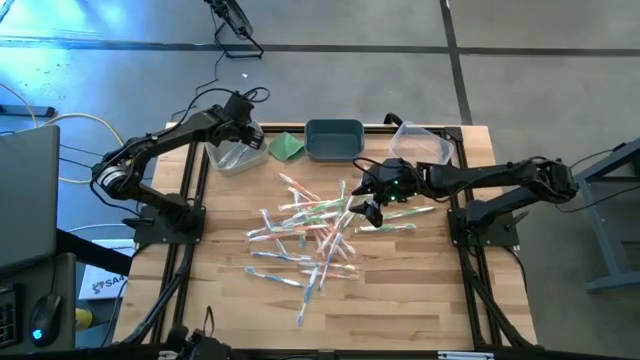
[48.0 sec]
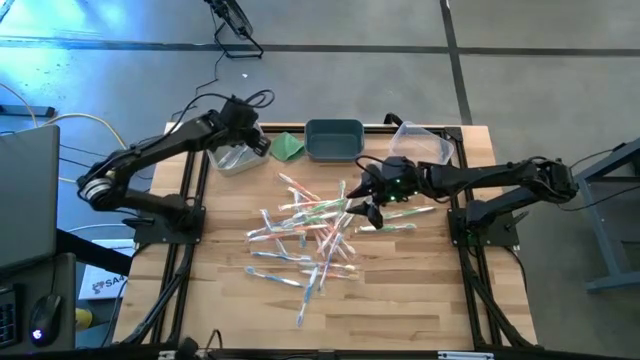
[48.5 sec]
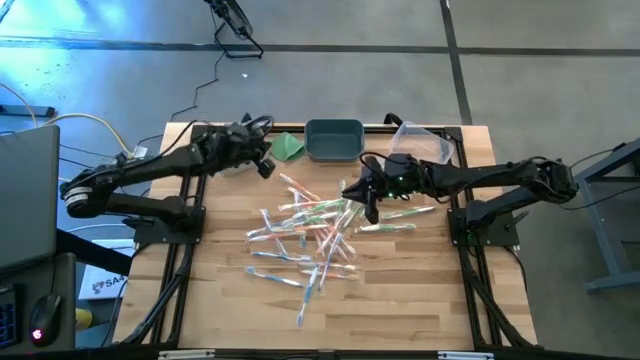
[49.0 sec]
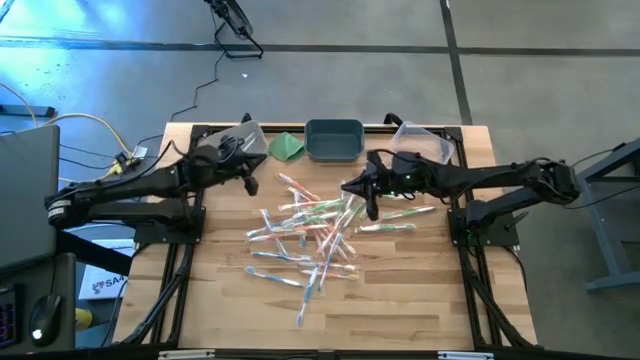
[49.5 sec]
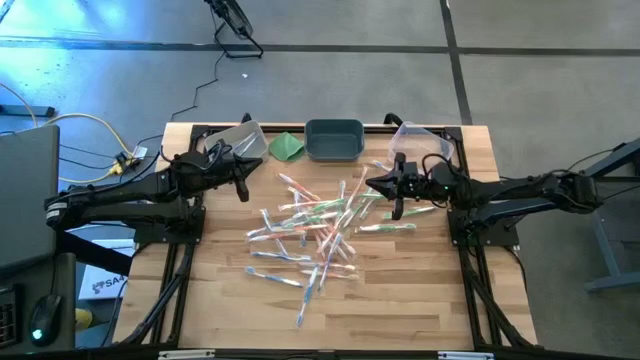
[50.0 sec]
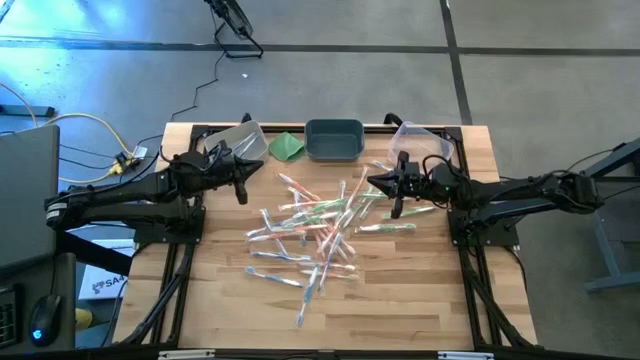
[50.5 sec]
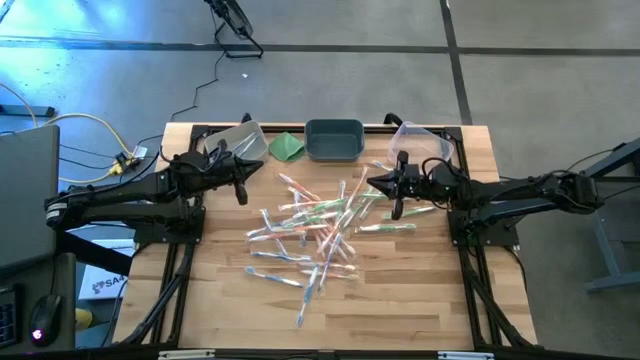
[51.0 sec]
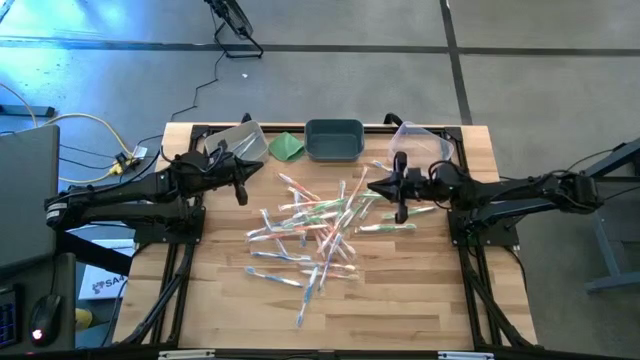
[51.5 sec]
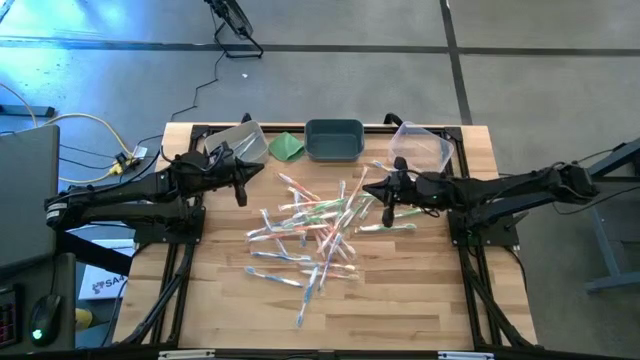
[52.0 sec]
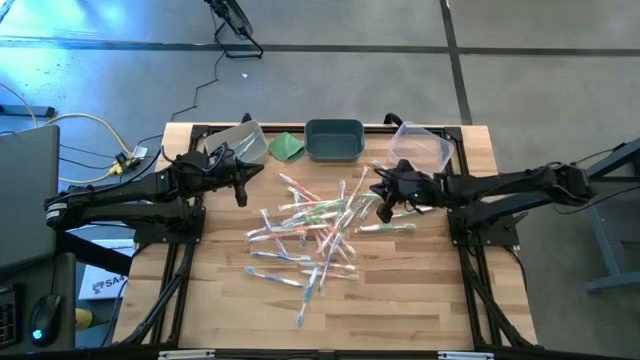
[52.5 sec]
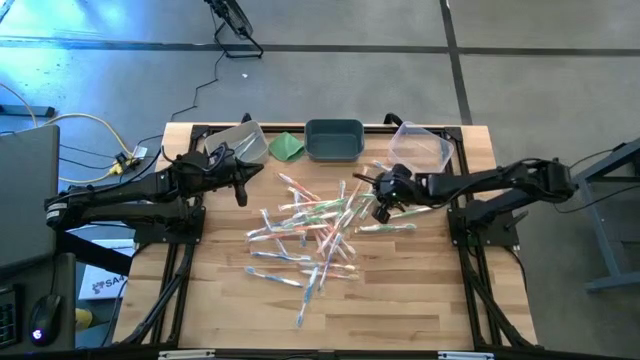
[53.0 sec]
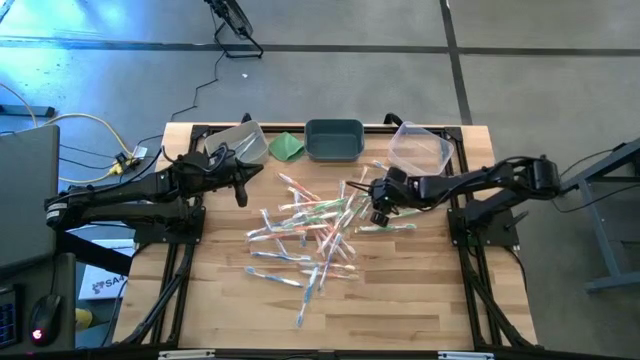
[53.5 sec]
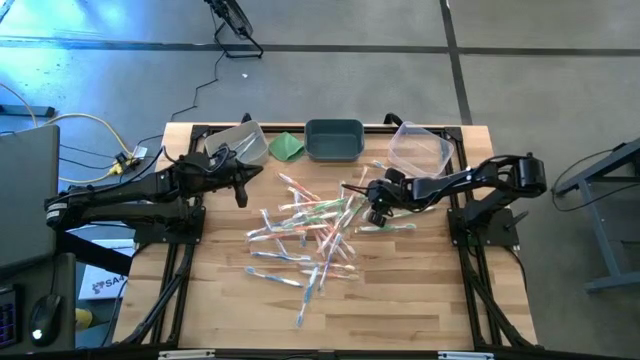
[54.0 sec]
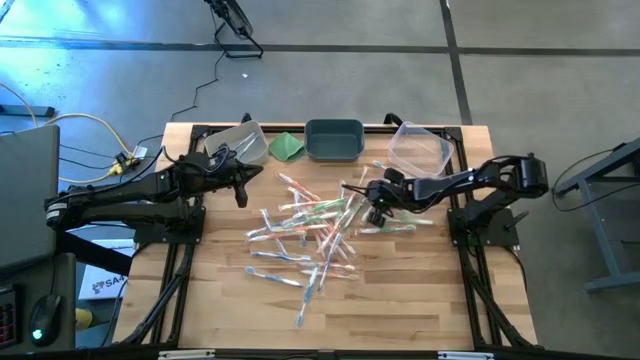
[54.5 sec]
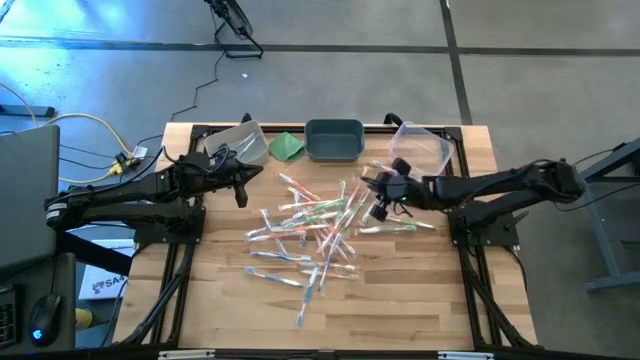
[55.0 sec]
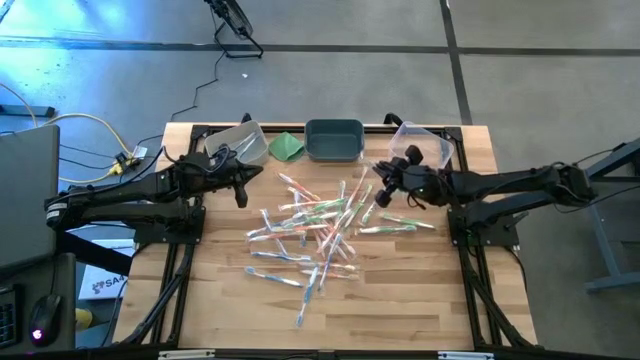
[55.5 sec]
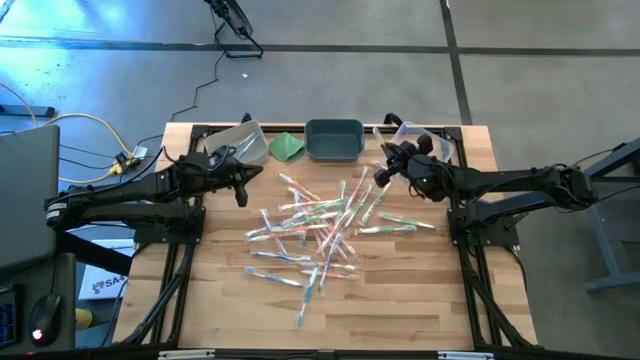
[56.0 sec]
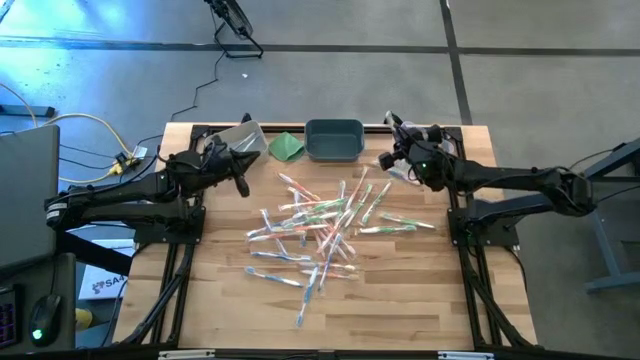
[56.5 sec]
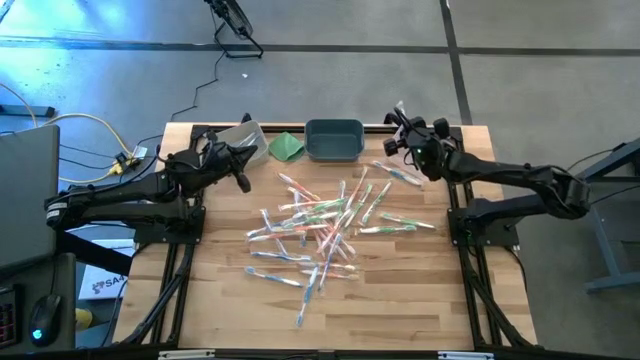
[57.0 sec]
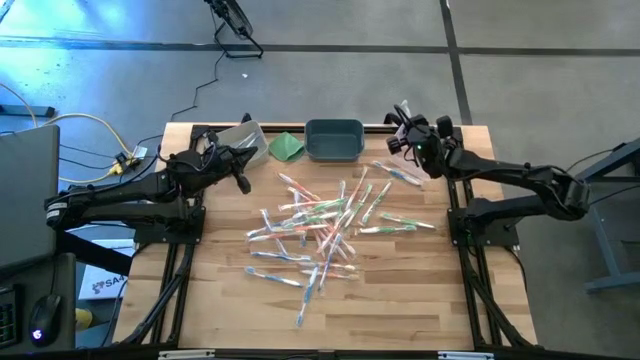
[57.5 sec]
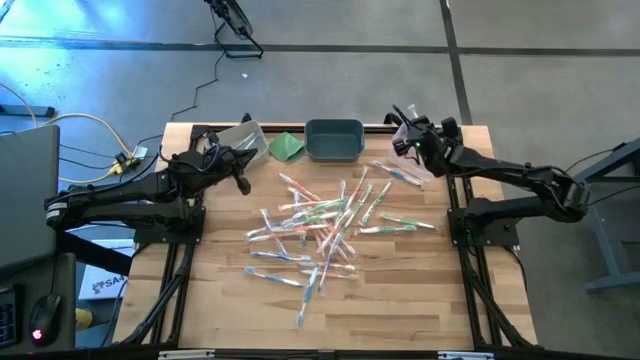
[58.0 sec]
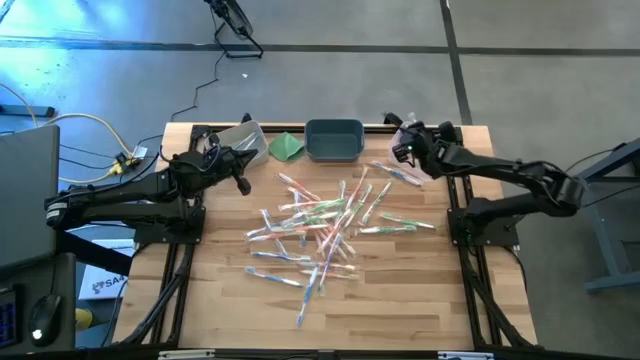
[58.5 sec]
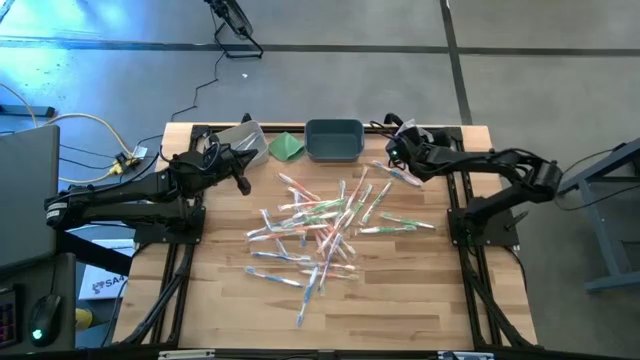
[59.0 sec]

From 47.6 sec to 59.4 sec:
Task: Pick & Place Toothbrushes
Put the green toothbrush into the transparent bin

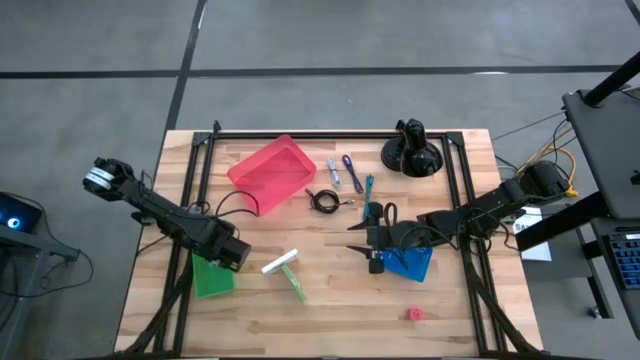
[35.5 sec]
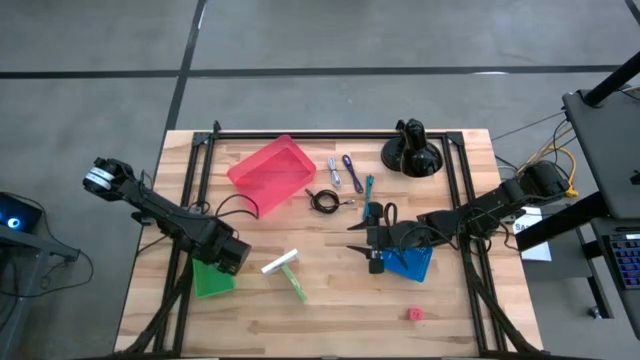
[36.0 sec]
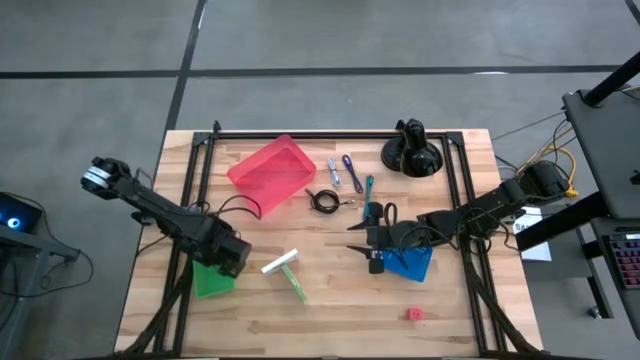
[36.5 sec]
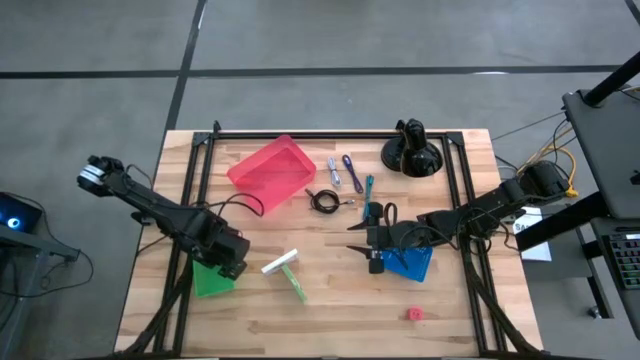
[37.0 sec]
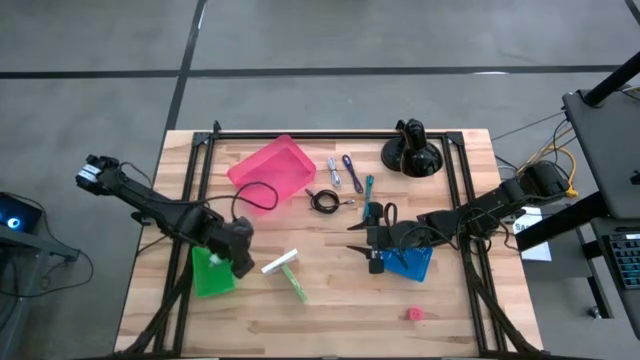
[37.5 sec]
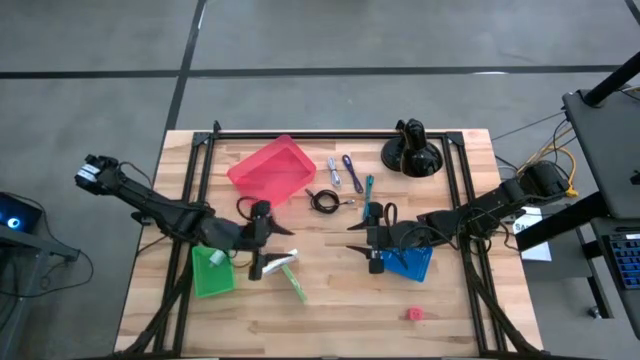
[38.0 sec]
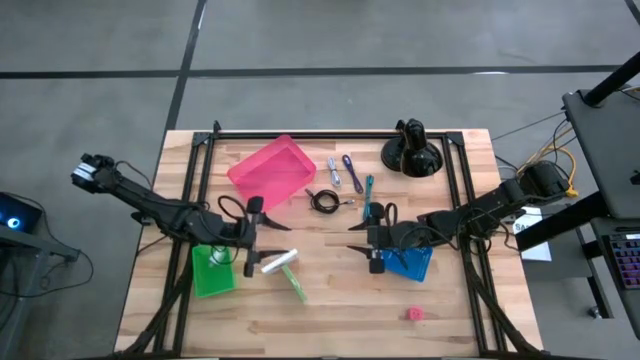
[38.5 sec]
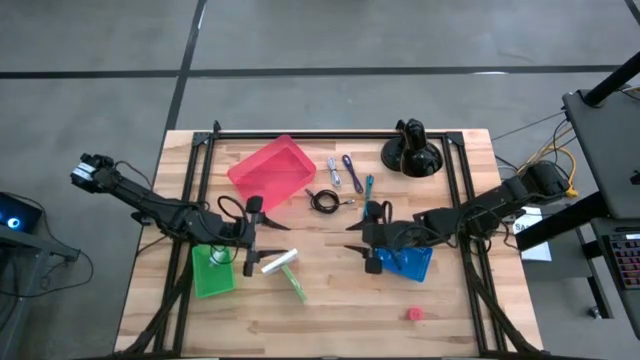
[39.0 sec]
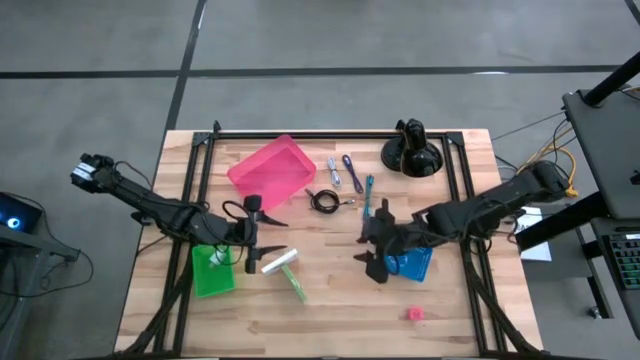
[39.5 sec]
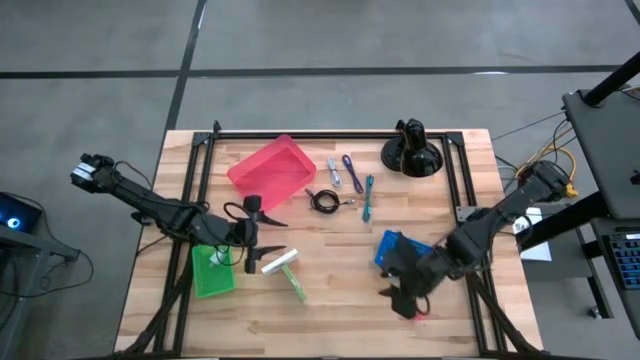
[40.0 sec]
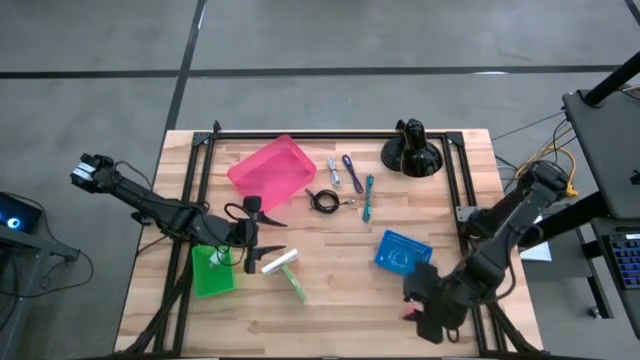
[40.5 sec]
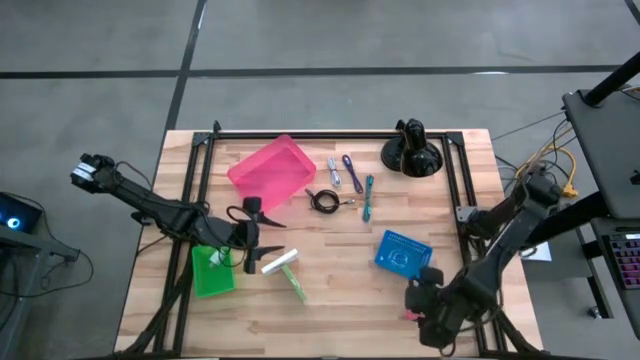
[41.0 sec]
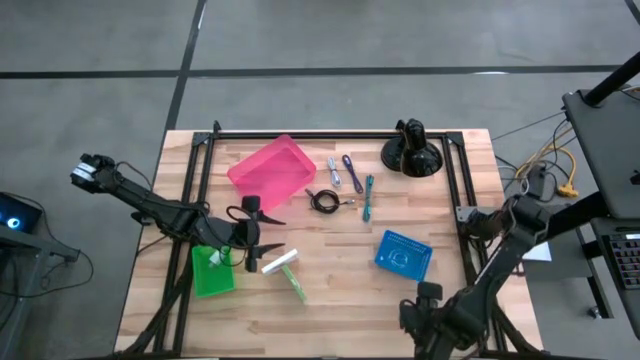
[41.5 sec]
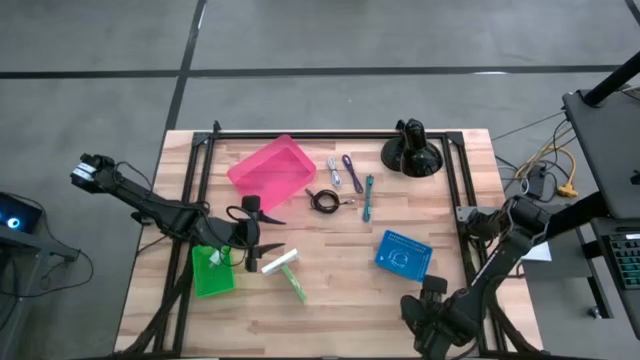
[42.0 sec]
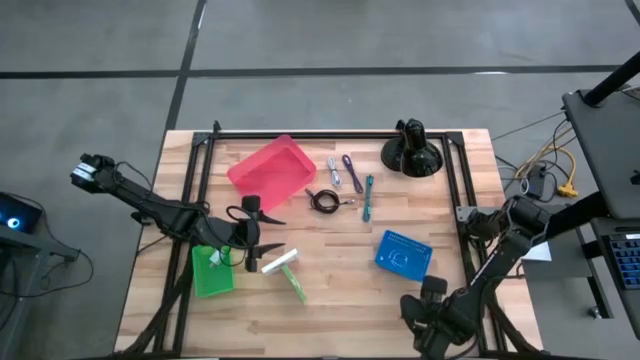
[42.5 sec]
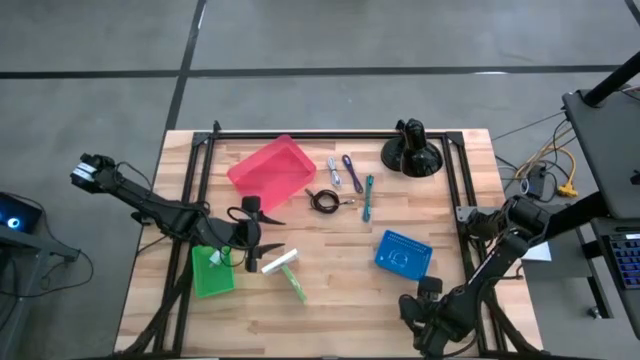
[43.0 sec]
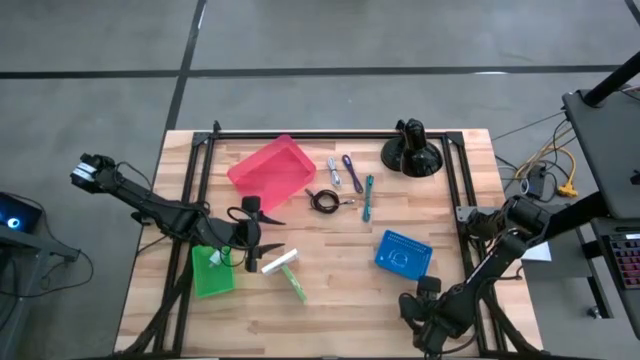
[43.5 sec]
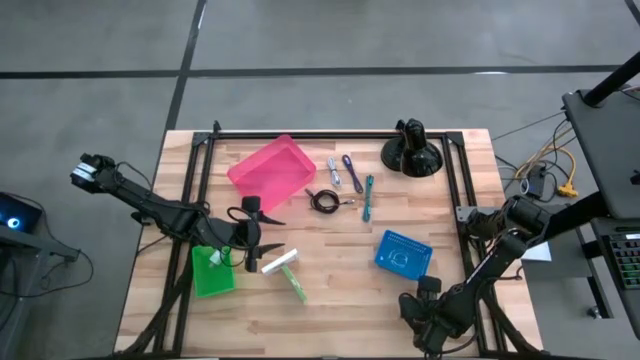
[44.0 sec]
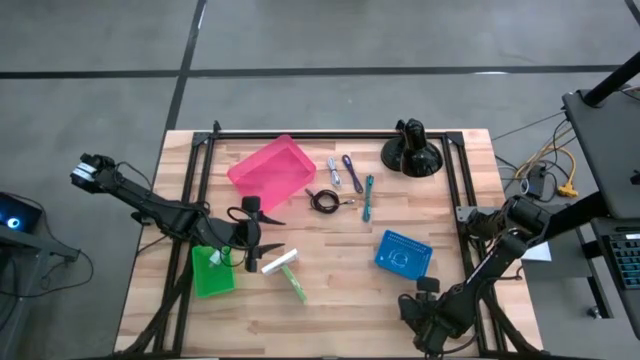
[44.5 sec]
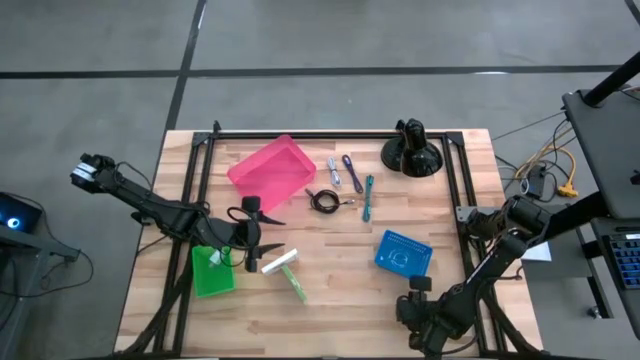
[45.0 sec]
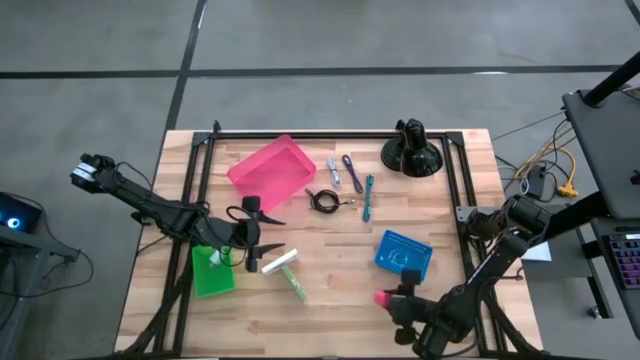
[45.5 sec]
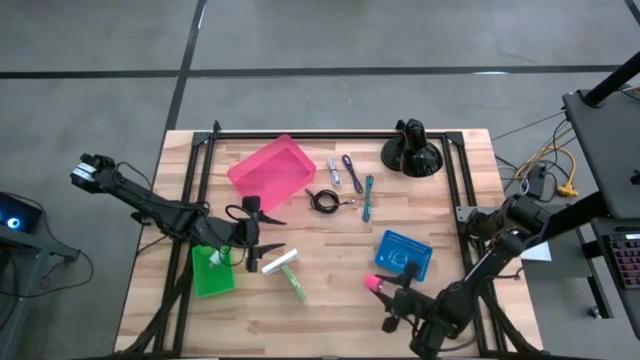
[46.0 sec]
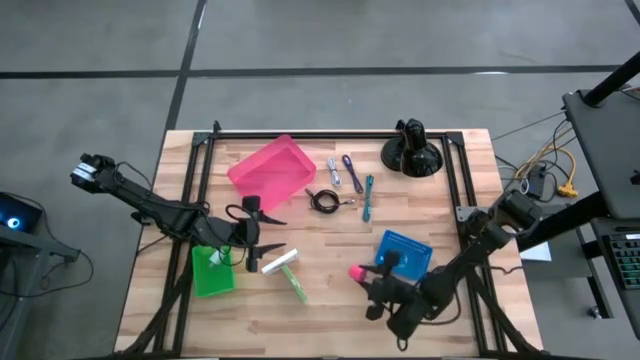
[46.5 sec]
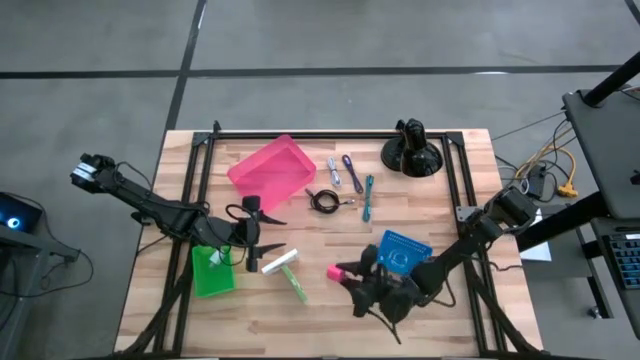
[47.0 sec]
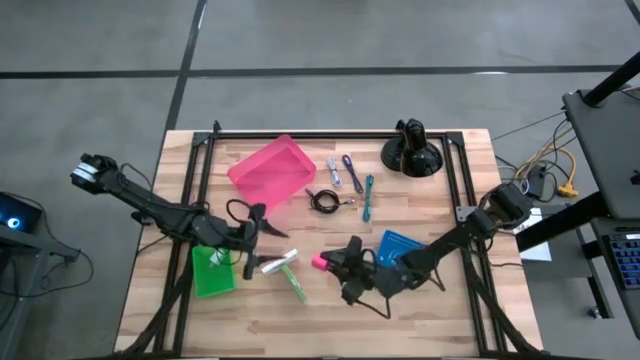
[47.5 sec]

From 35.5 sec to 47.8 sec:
Task: Pick and place items into bin
Put the pink charger adapter into the green bin
